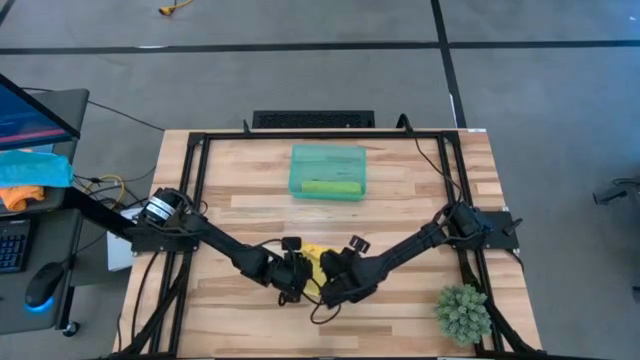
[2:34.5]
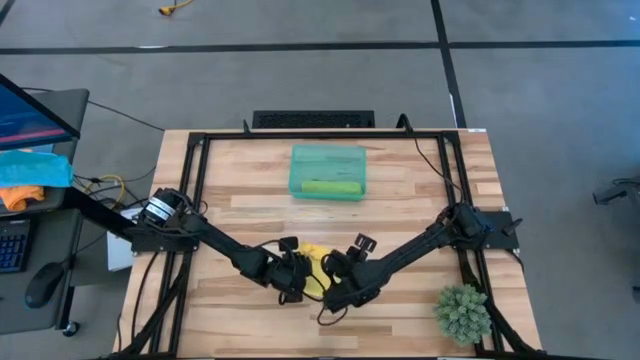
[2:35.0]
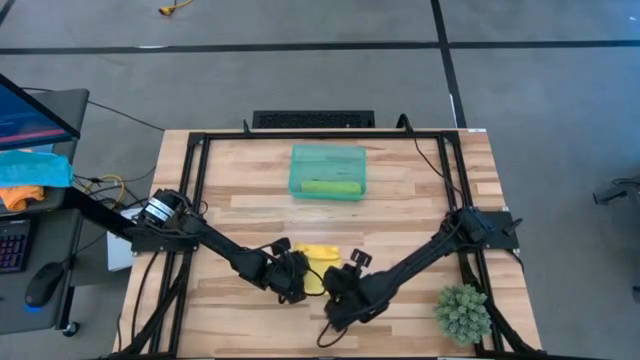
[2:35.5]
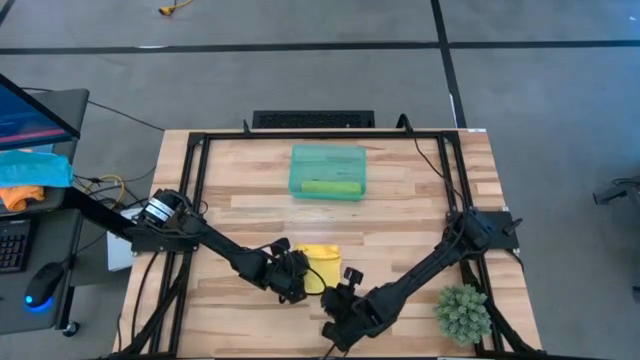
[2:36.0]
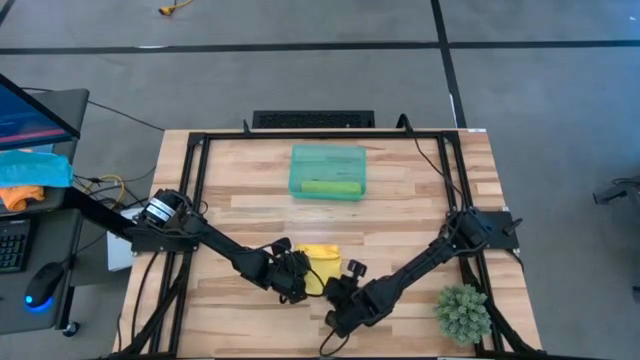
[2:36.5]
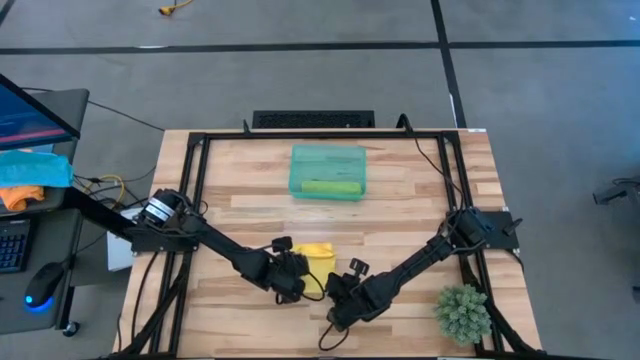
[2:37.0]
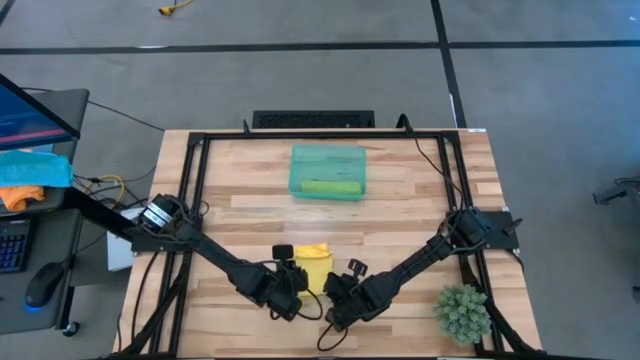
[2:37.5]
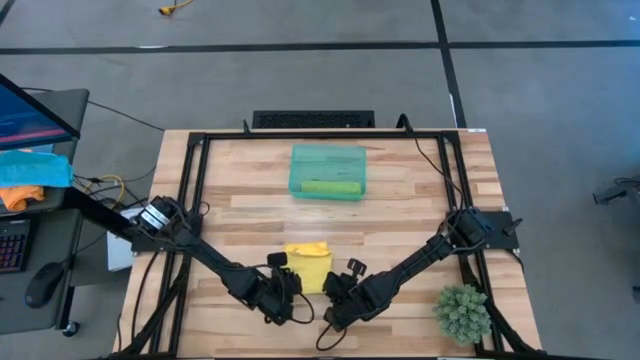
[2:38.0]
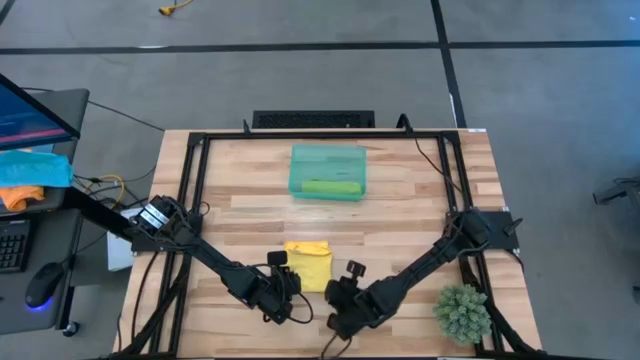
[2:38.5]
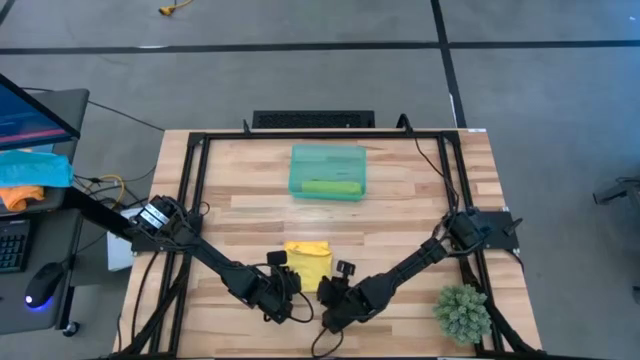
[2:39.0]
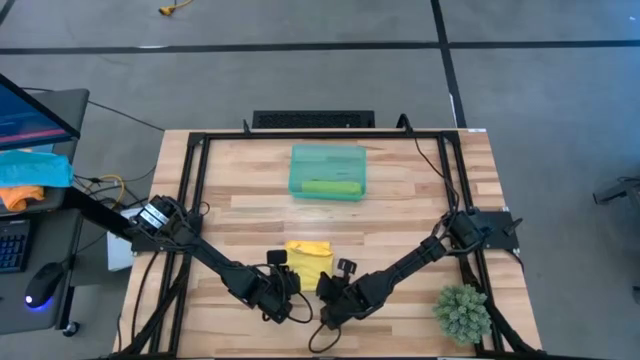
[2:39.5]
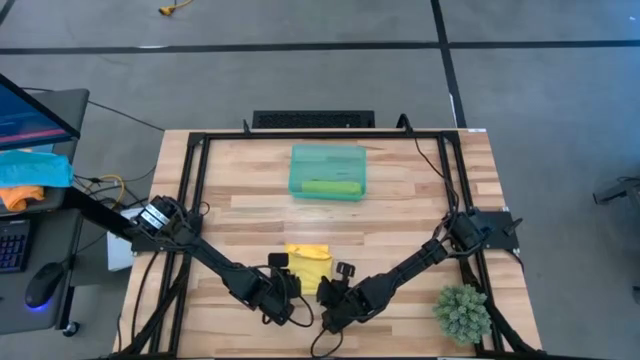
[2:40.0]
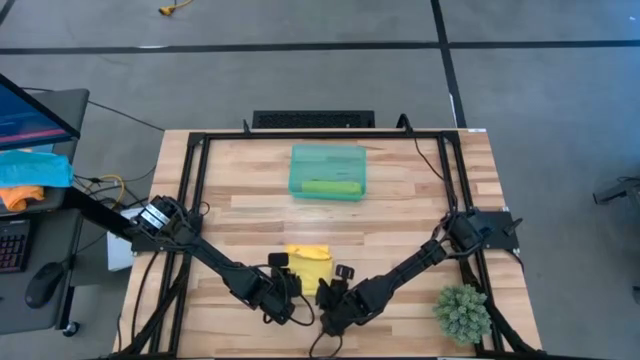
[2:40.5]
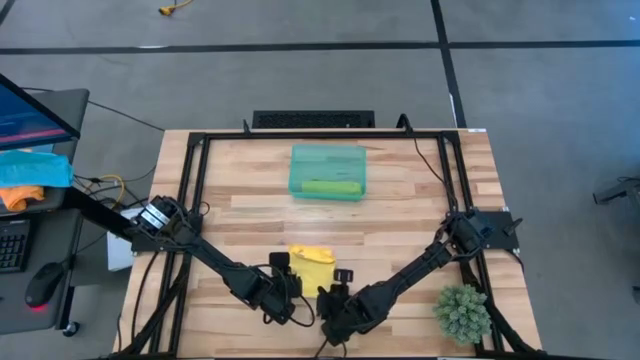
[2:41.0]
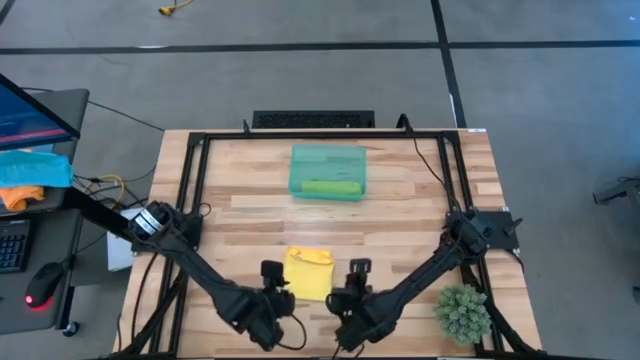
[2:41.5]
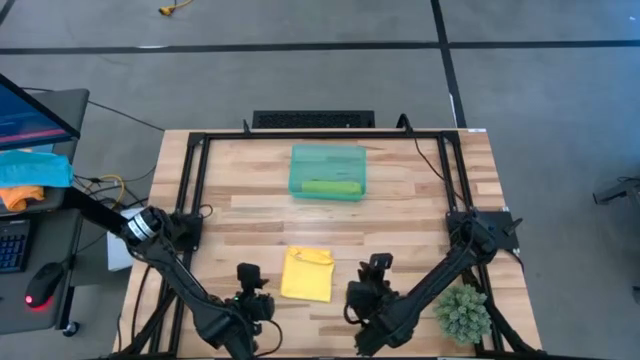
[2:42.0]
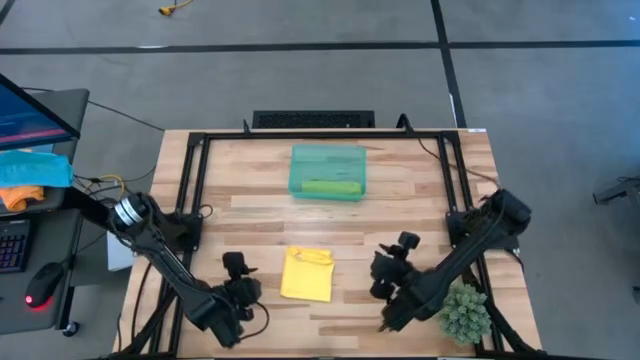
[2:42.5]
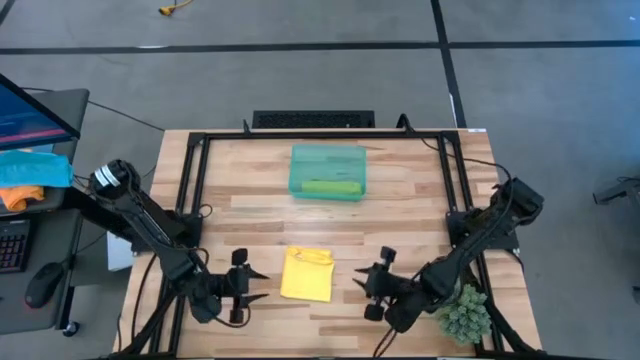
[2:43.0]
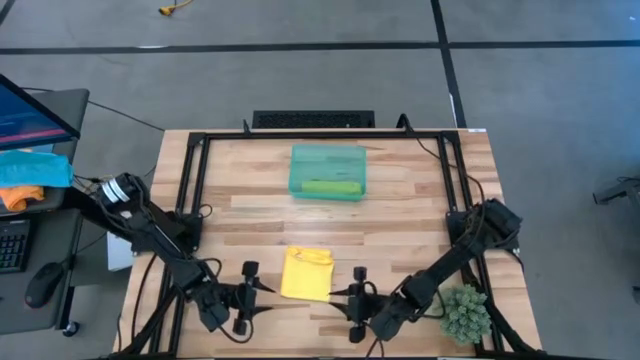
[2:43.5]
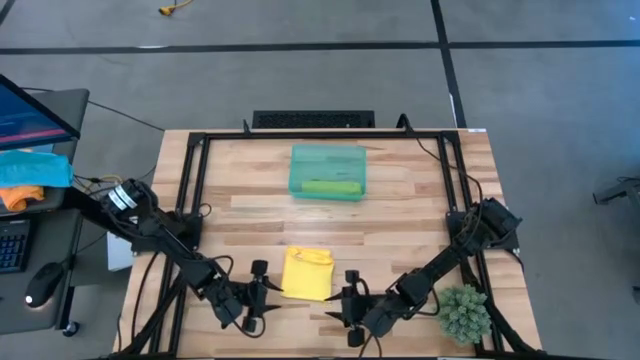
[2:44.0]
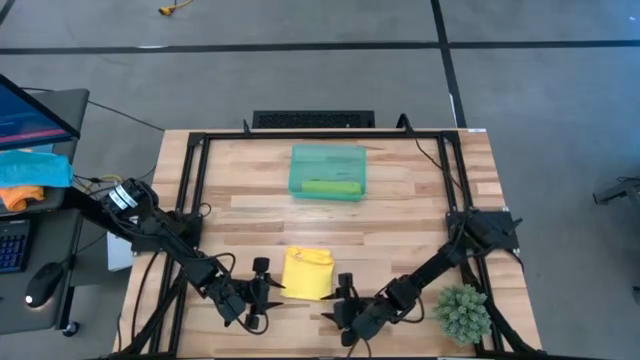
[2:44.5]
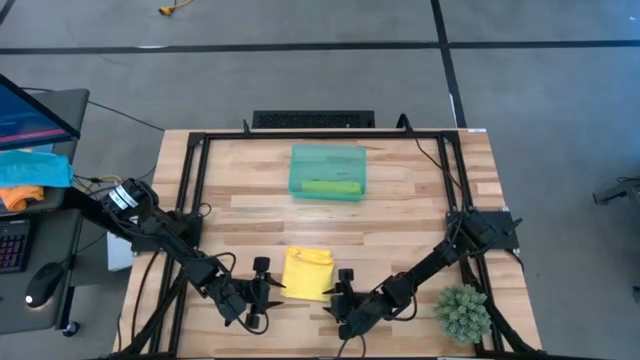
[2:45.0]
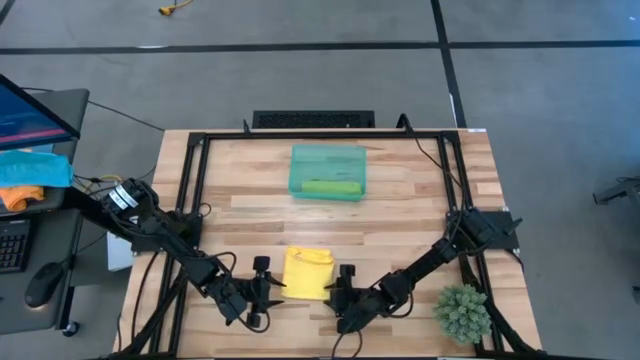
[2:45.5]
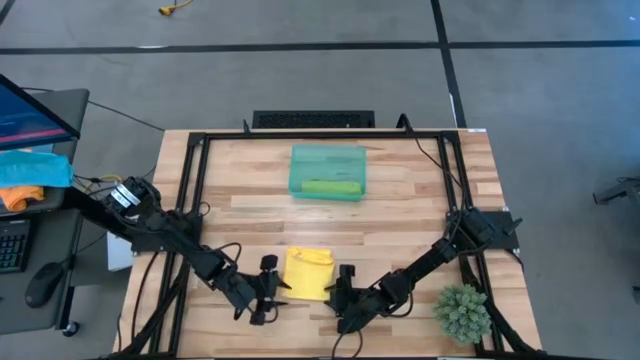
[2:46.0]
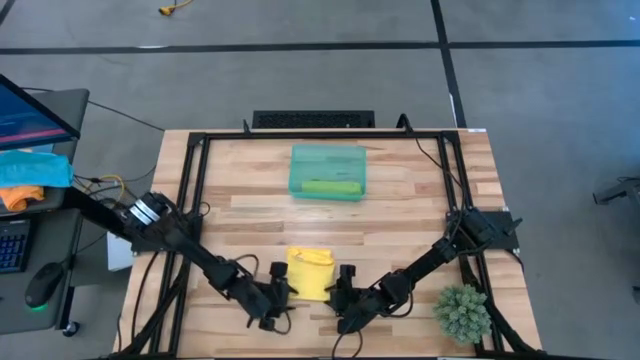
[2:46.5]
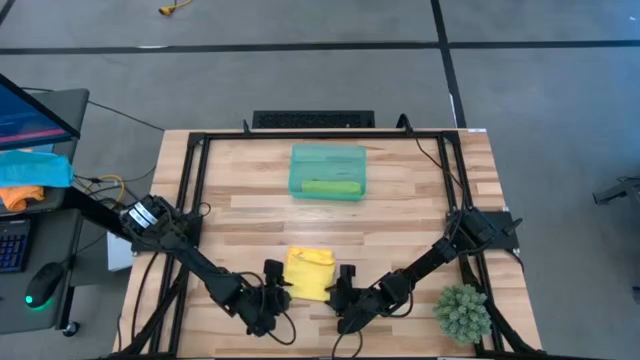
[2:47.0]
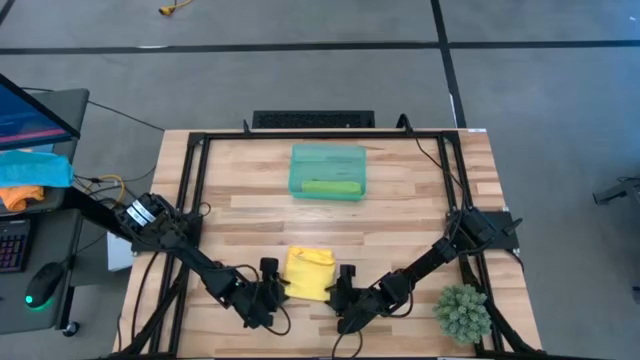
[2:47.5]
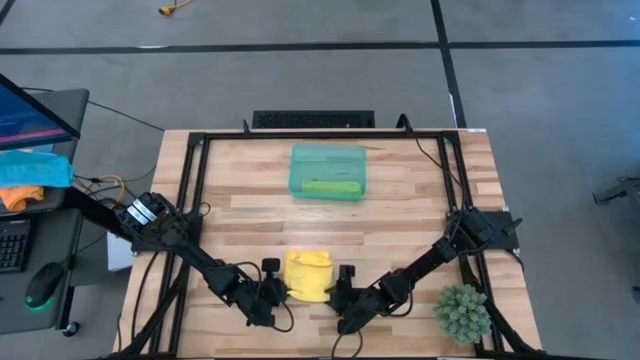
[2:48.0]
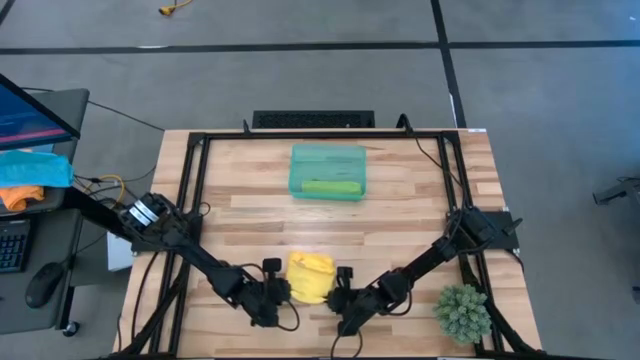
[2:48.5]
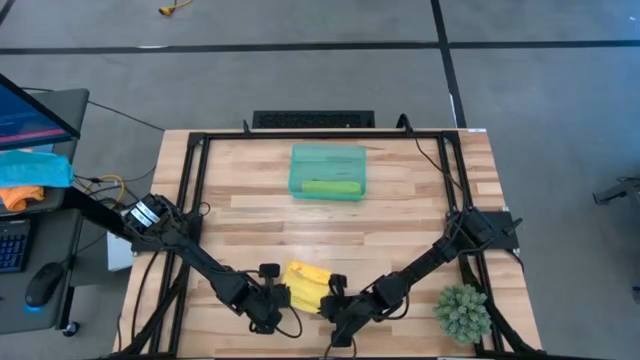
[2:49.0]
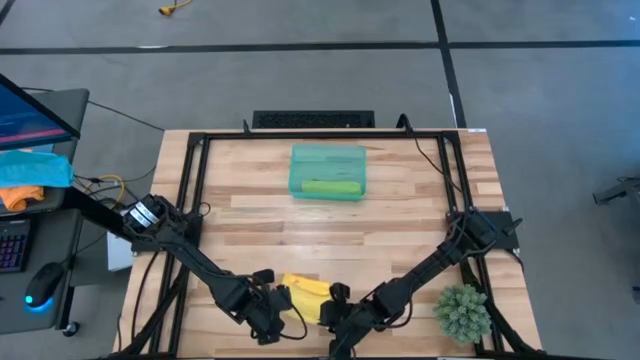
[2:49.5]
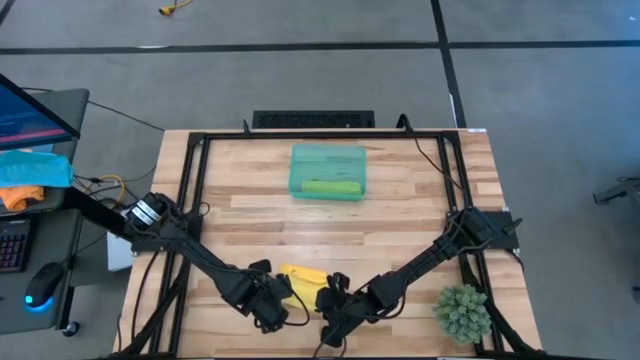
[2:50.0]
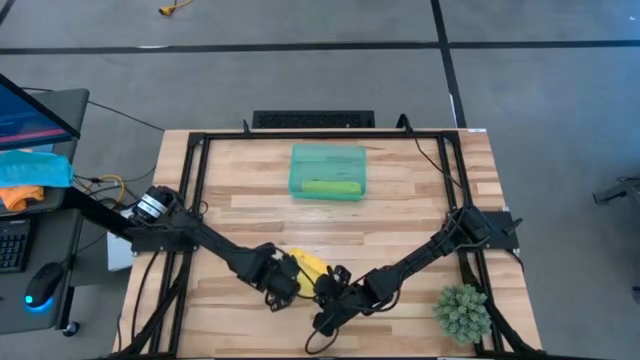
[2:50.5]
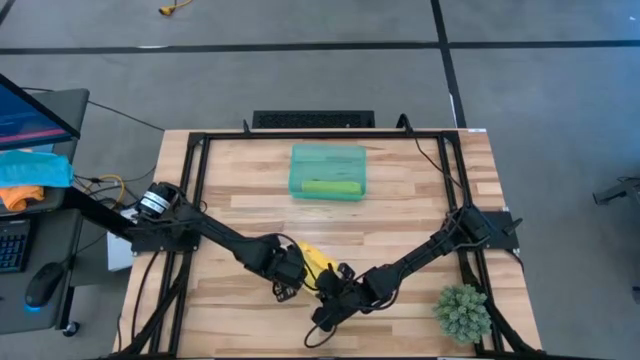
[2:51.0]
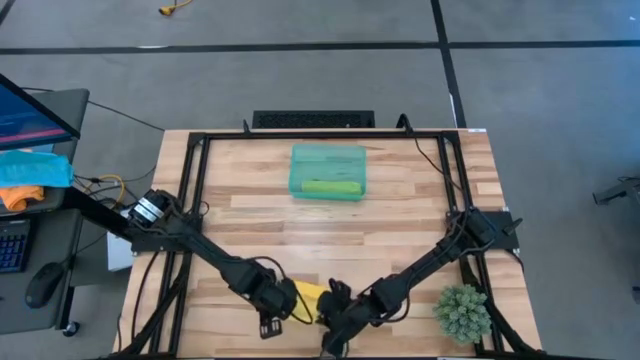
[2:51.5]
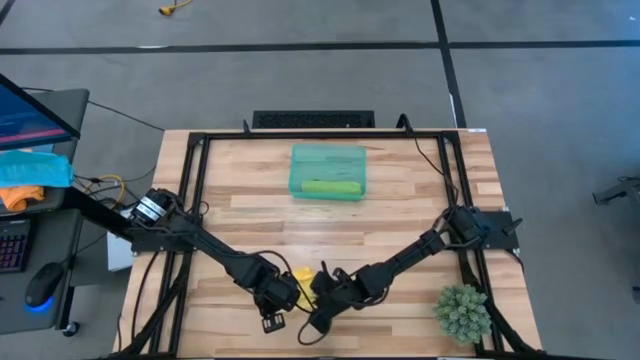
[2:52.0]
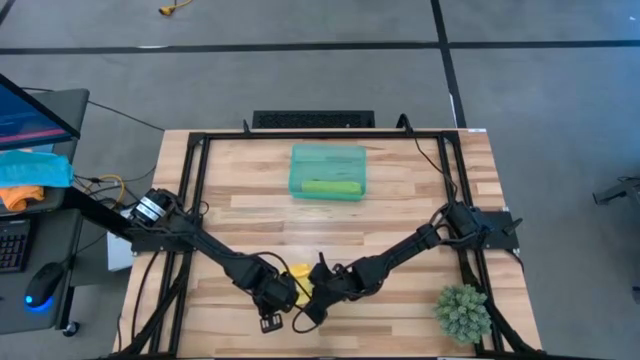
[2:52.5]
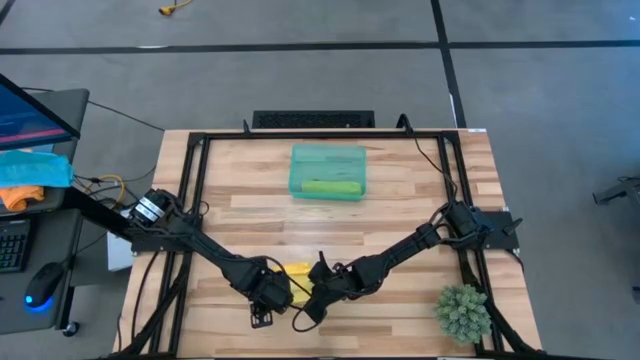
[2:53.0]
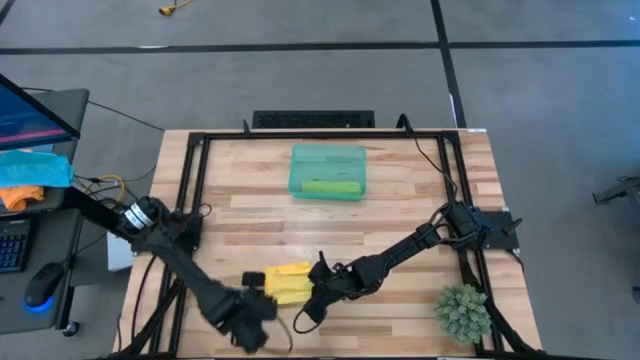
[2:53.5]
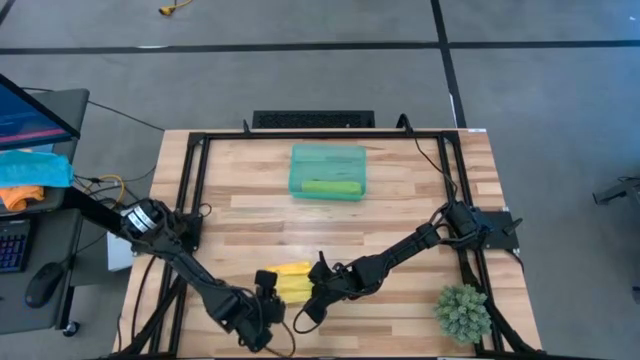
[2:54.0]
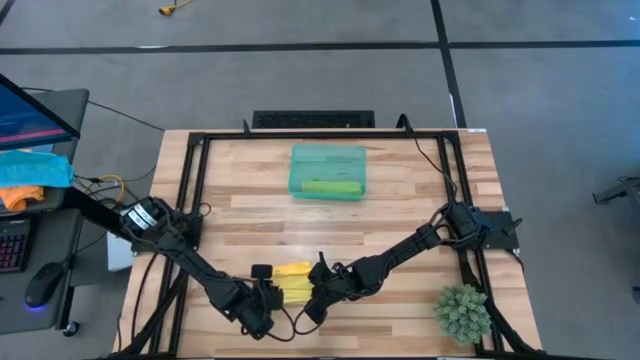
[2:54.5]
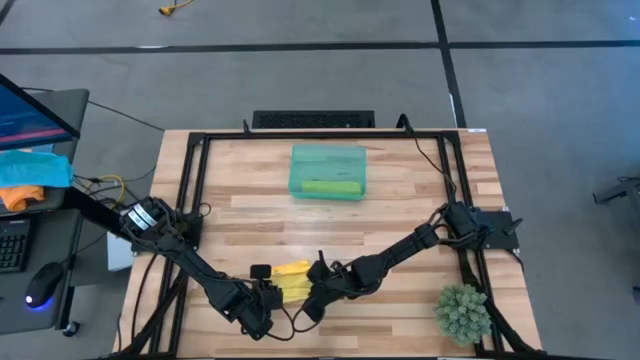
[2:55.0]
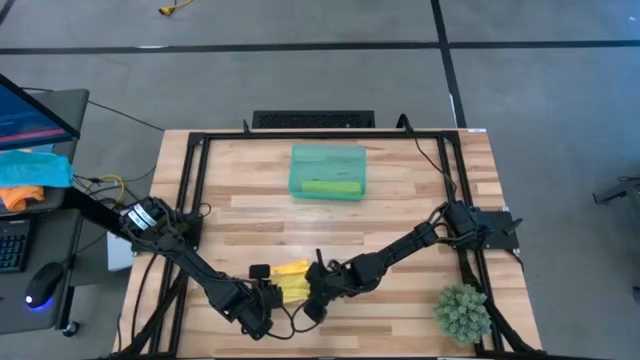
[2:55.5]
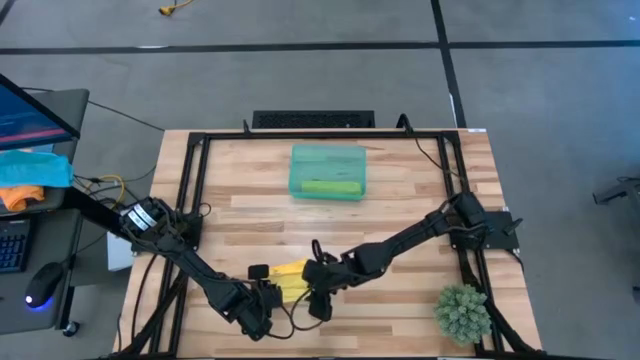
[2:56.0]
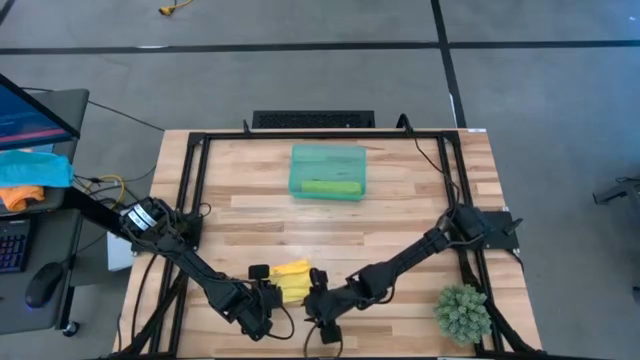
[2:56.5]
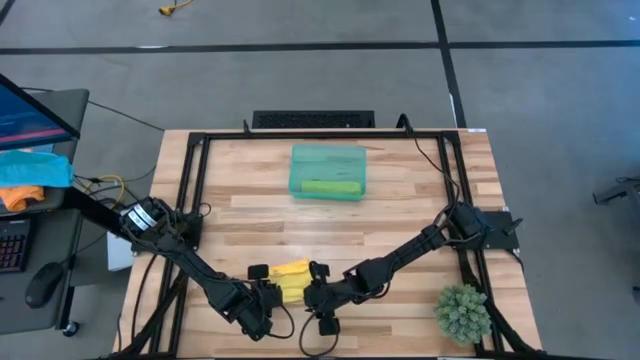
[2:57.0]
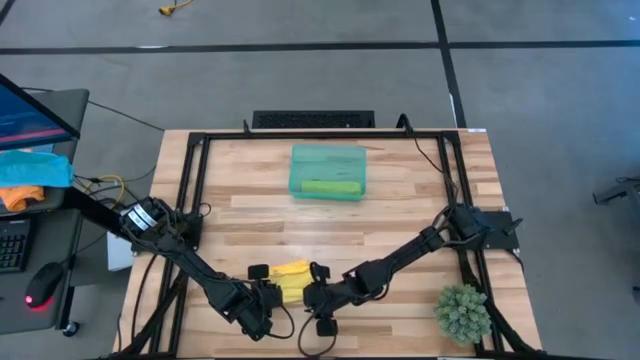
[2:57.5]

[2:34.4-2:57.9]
Task: Roll microfiber towels into tight, uniform cylinder then place into a basket
Roll the folded yellow microfiber towel
